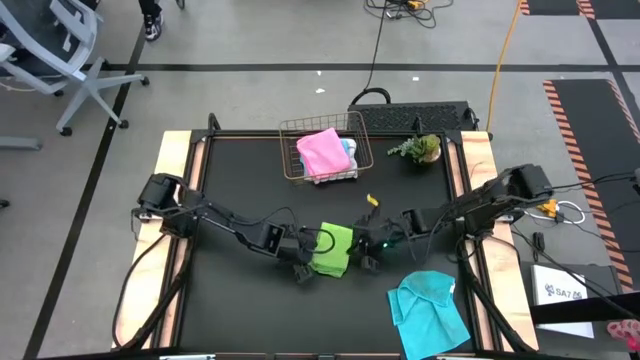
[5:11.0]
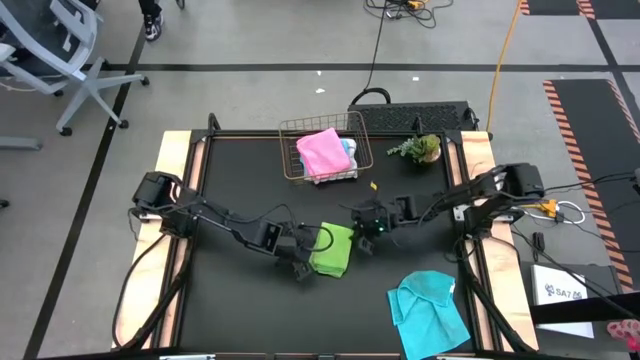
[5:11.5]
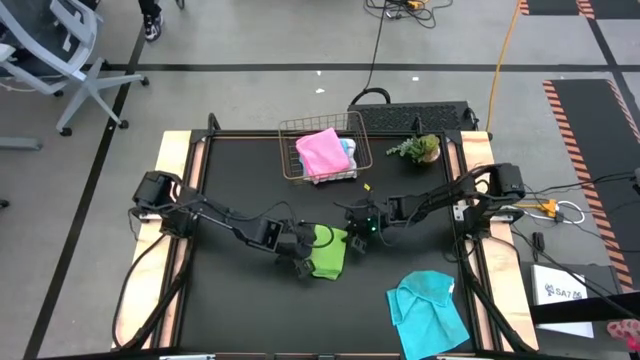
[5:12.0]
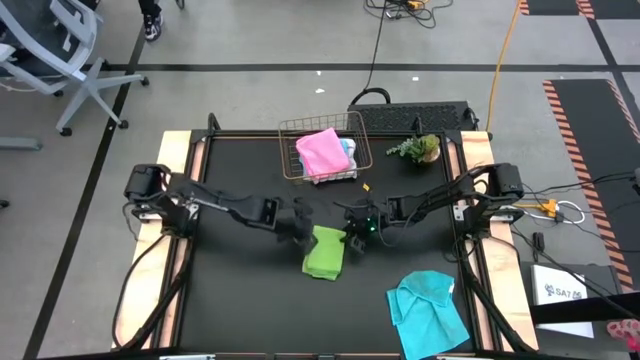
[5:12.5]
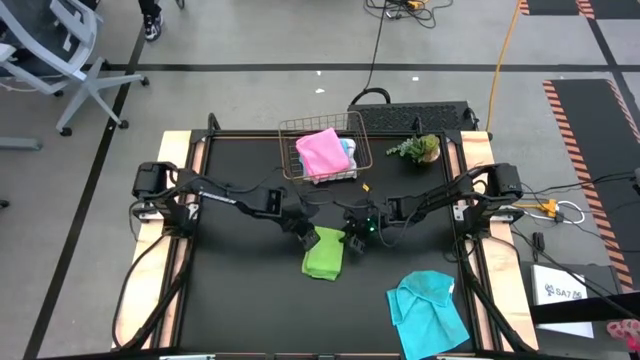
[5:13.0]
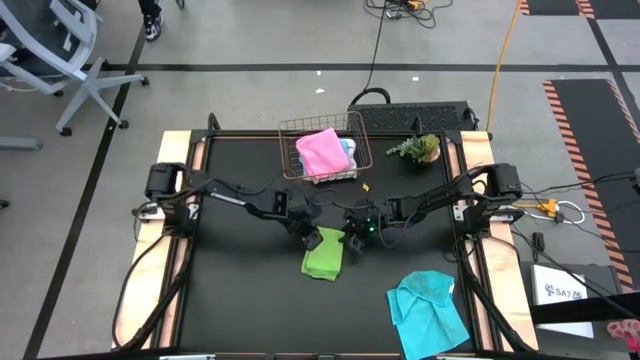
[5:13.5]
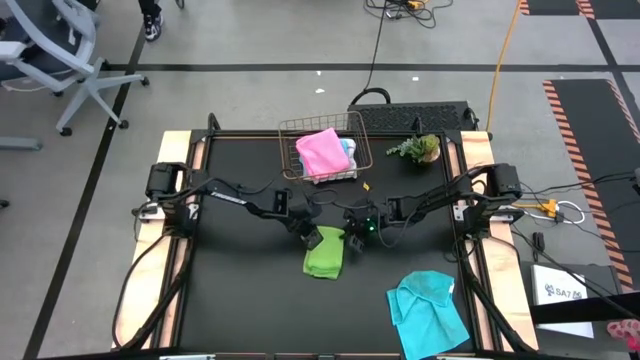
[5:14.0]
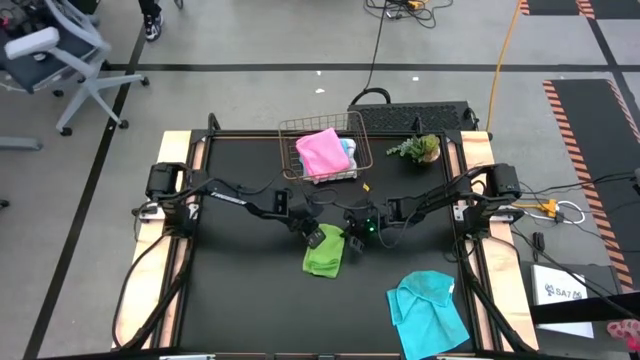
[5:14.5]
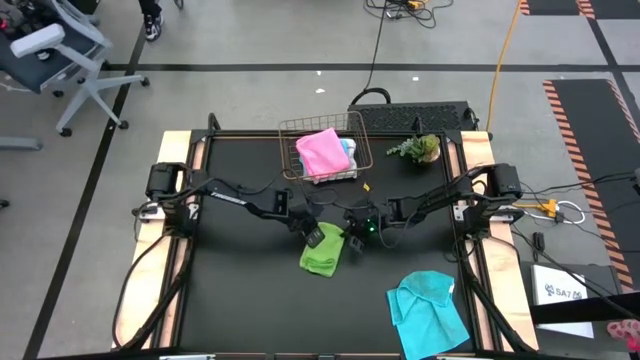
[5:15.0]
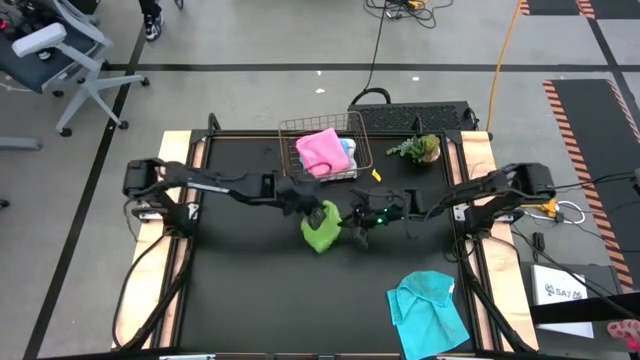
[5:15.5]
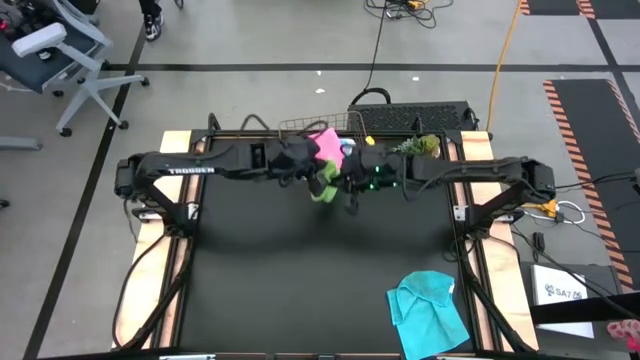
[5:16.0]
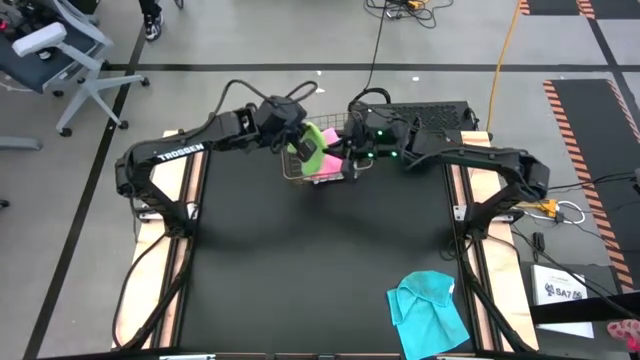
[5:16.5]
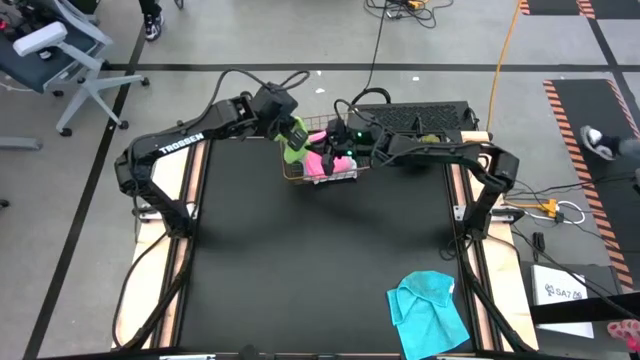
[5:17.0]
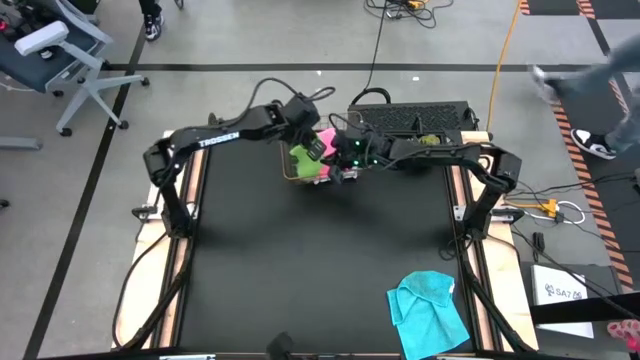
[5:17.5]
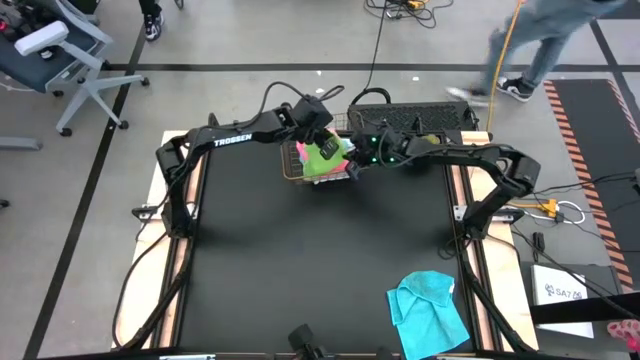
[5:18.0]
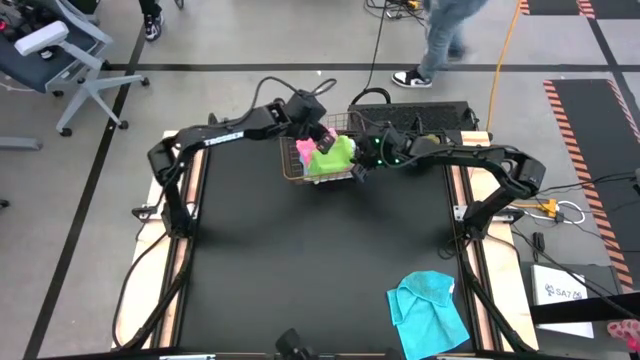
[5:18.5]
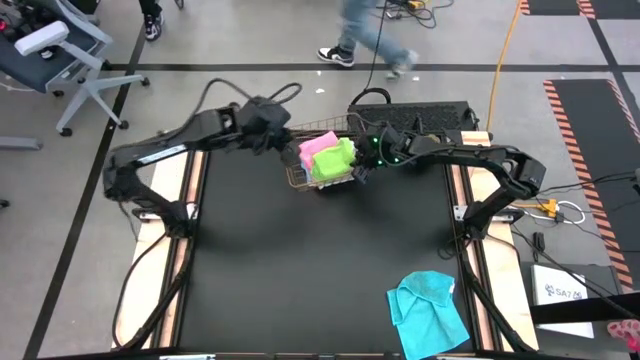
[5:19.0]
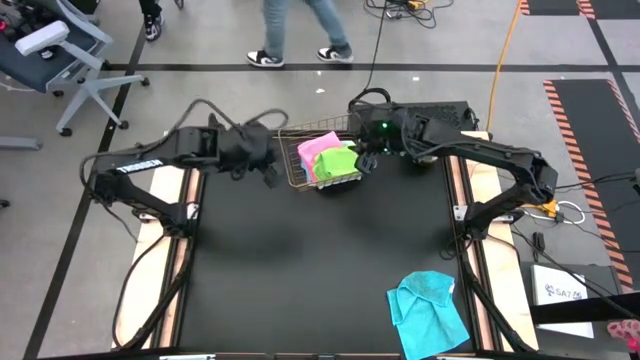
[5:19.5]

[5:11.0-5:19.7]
Task: Fold microfiber towels
Put the green microfiber cloth into the wire basket

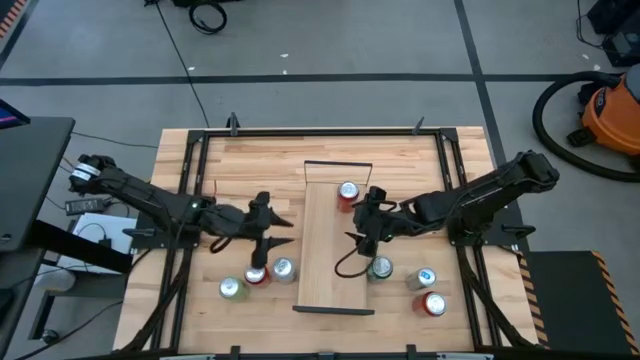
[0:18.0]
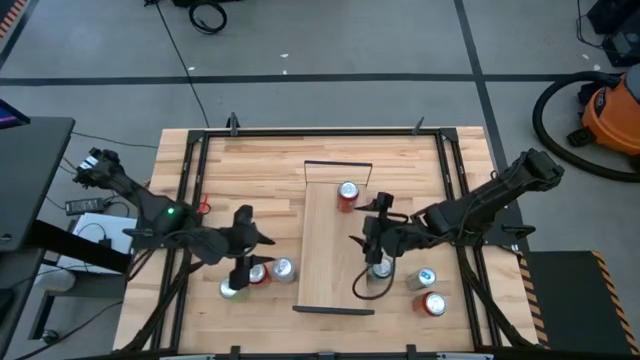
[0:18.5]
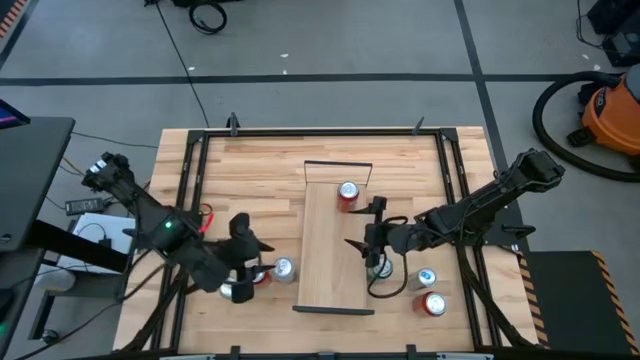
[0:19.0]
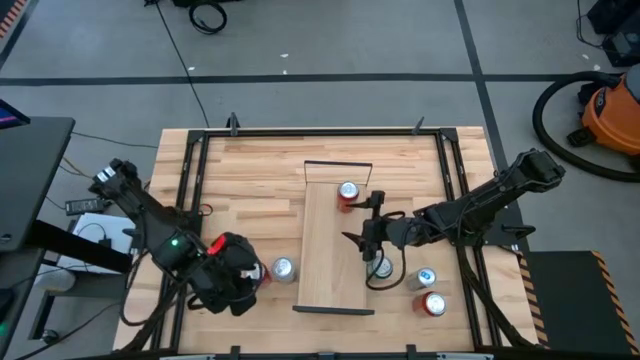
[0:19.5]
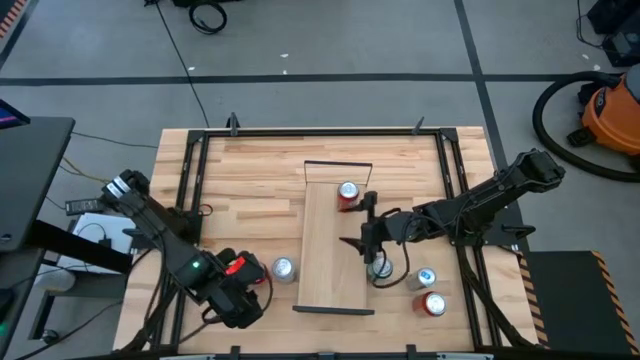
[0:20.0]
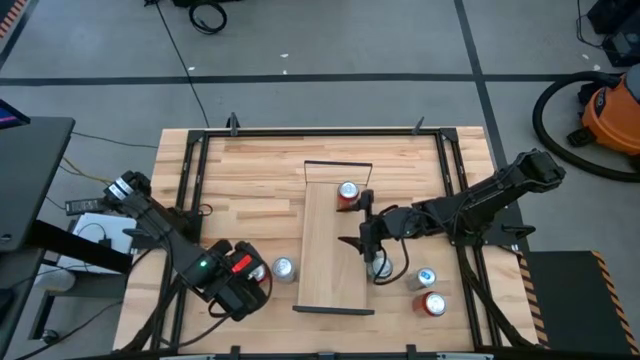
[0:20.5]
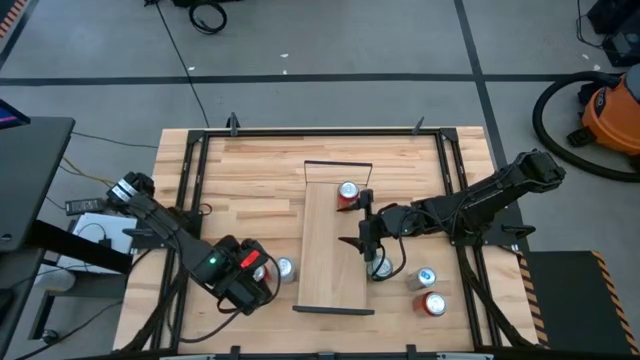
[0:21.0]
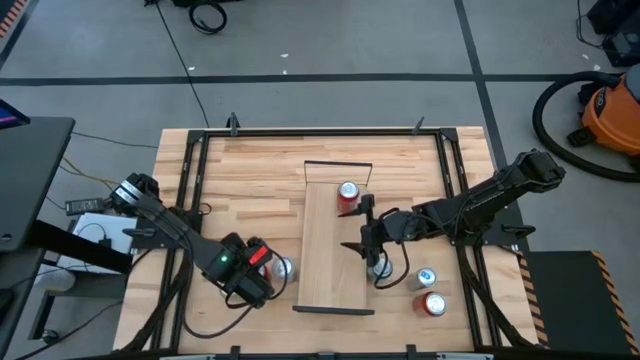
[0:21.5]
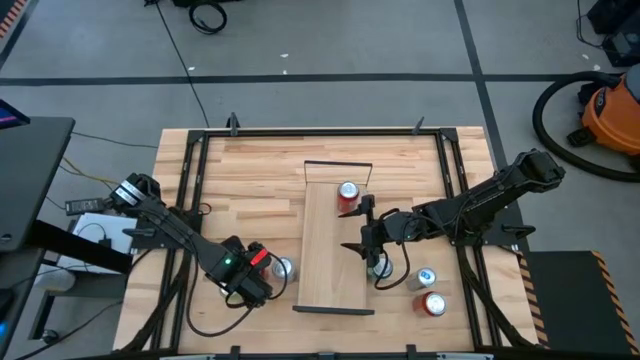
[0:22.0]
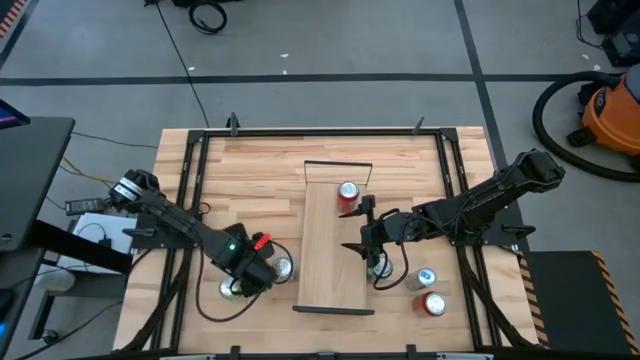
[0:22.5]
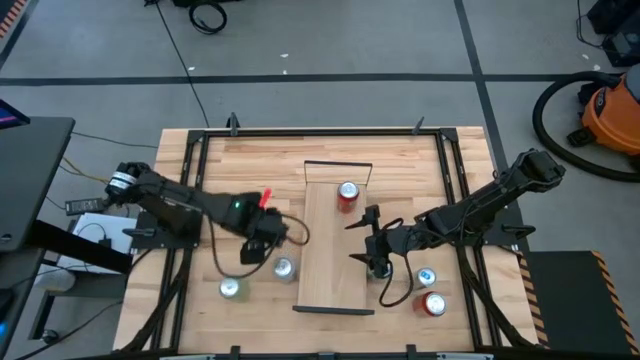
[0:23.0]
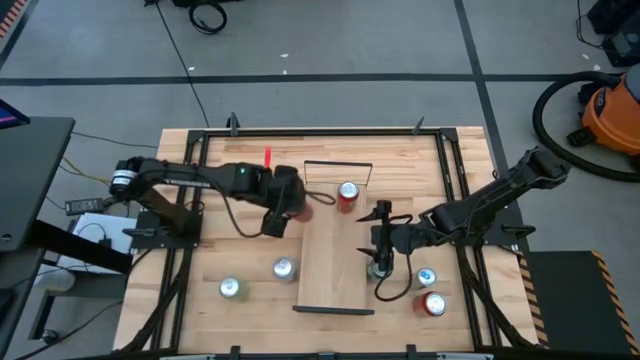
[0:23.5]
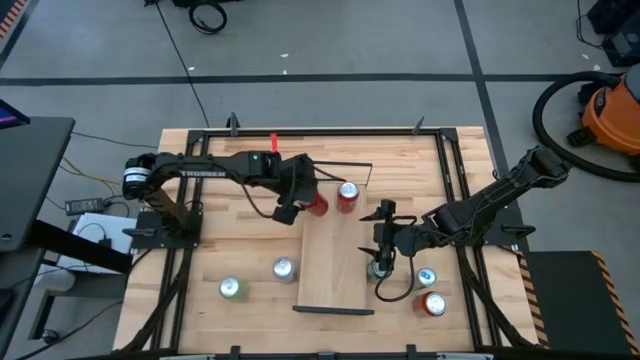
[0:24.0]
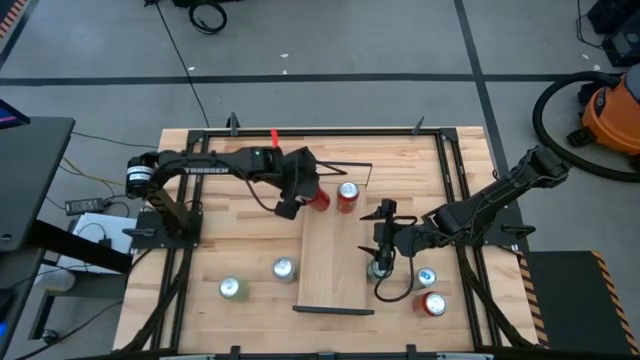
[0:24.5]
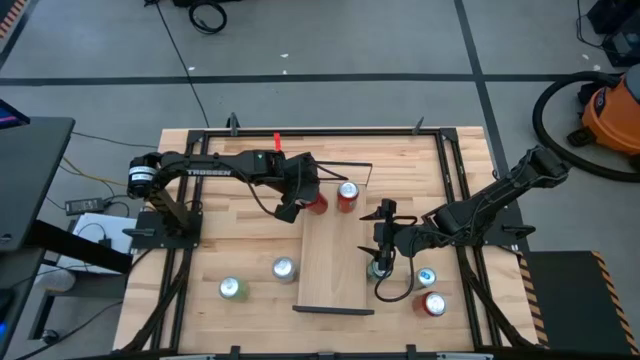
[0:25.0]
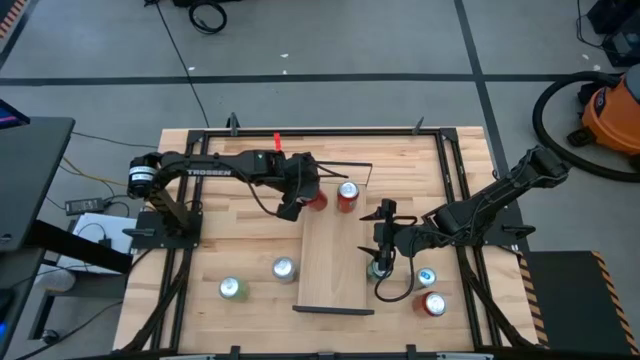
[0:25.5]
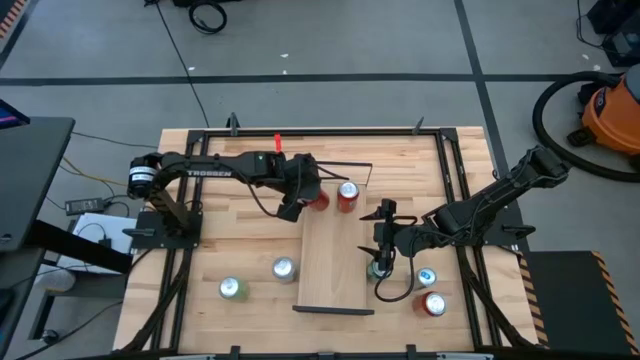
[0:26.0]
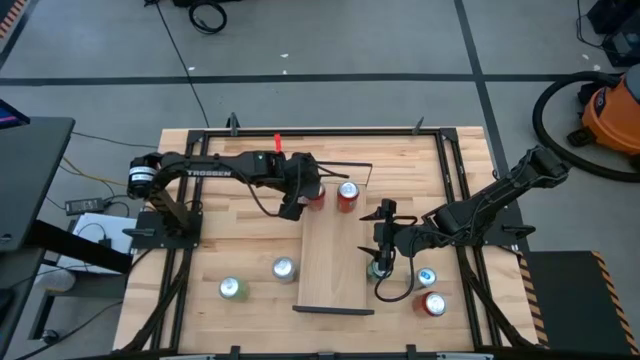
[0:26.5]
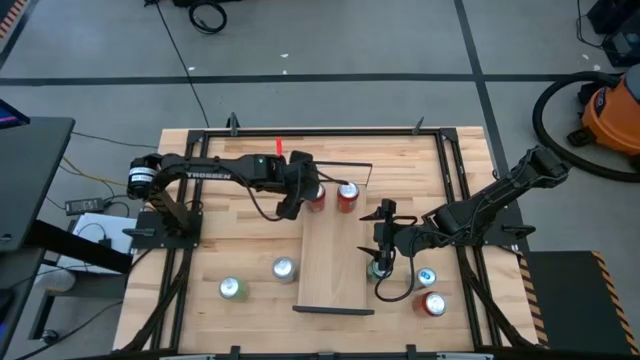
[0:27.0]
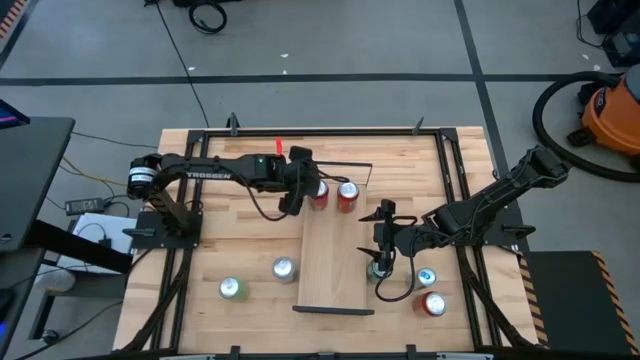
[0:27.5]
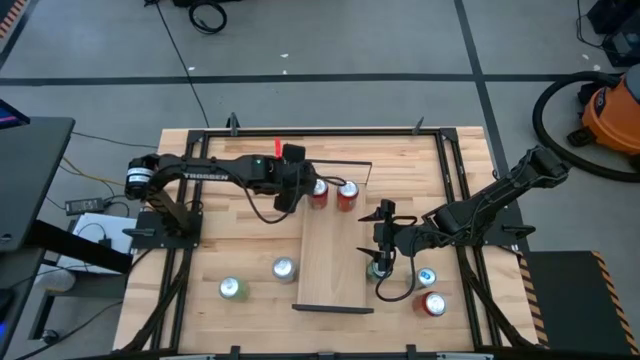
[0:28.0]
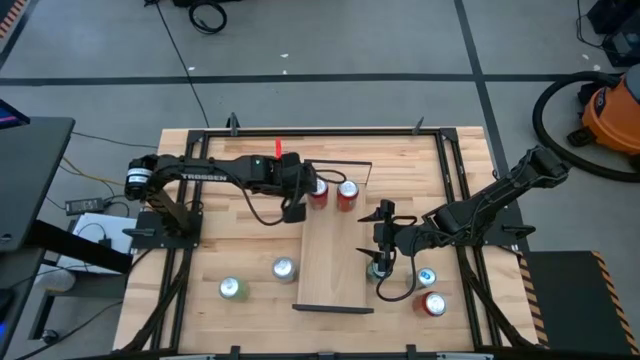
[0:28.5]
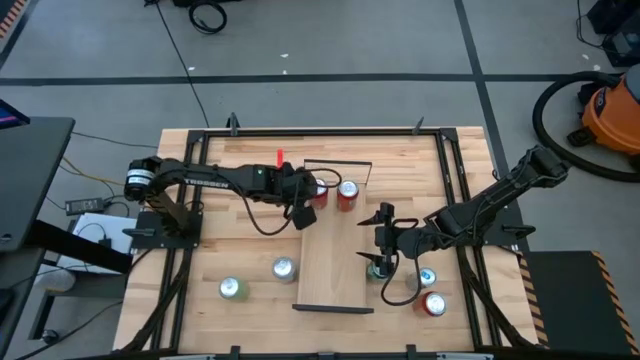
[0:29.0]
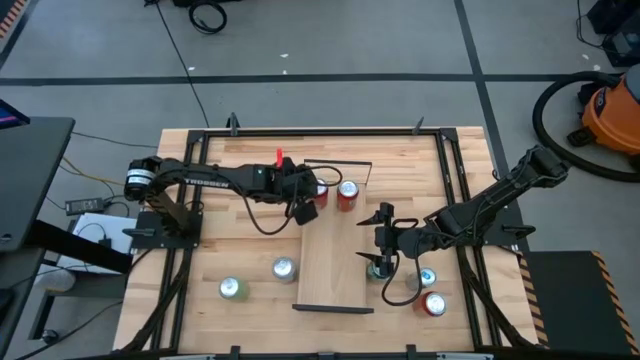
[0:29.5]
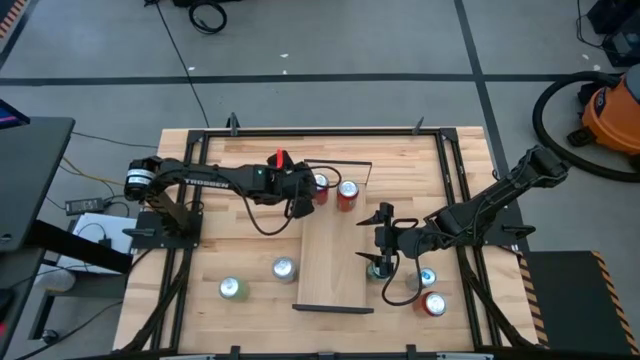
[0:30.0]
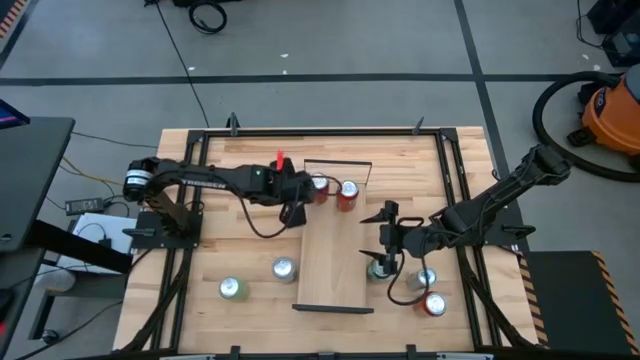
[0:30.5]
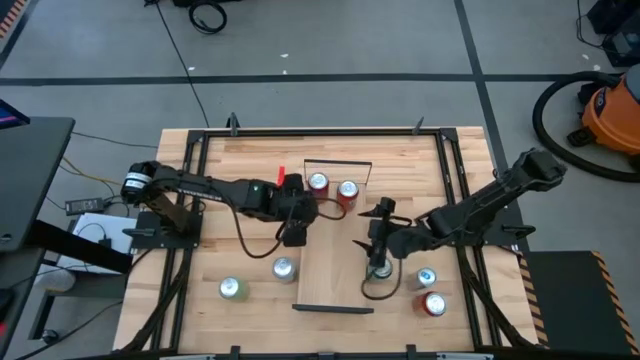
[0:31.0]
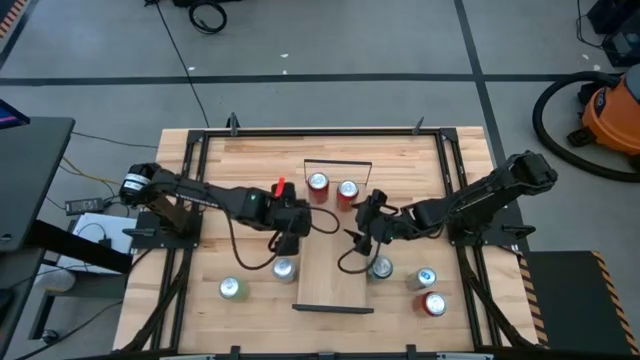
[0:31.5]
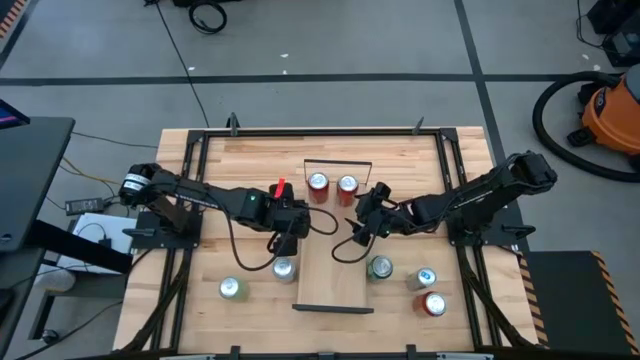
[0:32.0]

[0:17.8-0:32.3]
Task: Place canned beverage on shelf
Put the red/black soda can on the shelf
